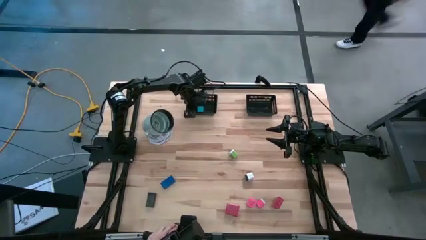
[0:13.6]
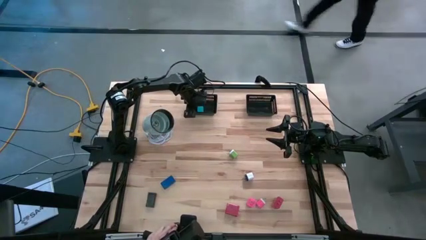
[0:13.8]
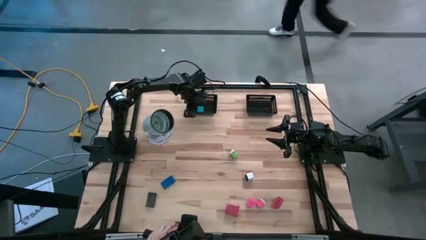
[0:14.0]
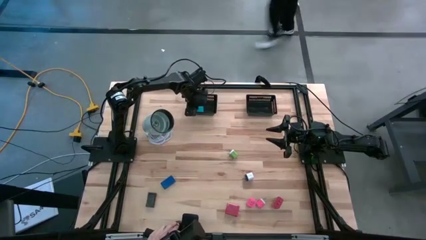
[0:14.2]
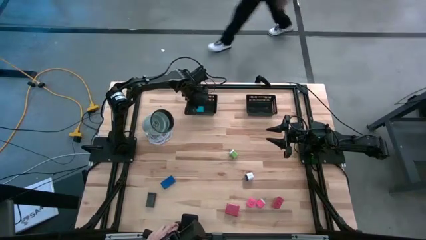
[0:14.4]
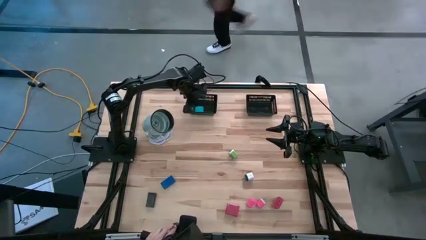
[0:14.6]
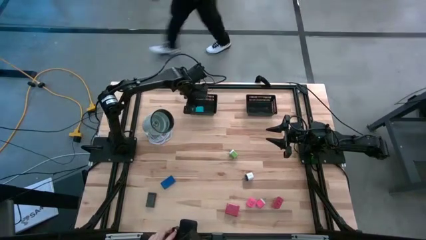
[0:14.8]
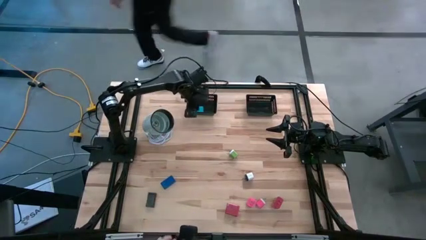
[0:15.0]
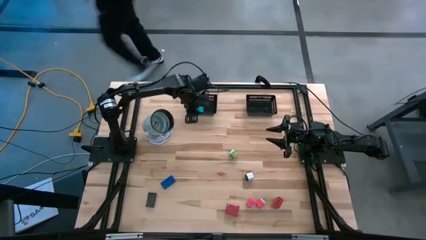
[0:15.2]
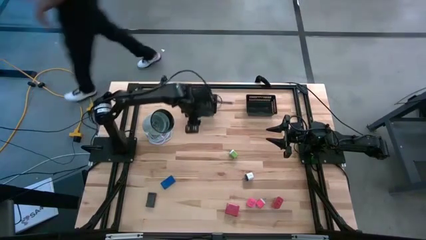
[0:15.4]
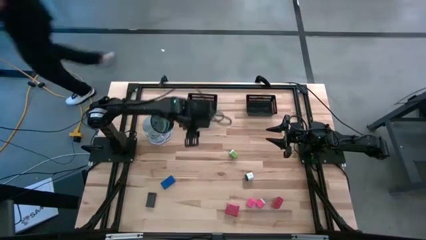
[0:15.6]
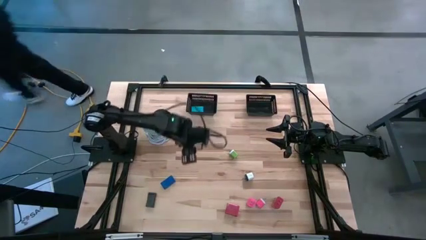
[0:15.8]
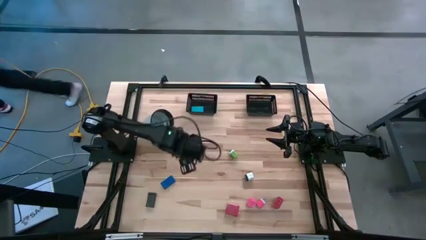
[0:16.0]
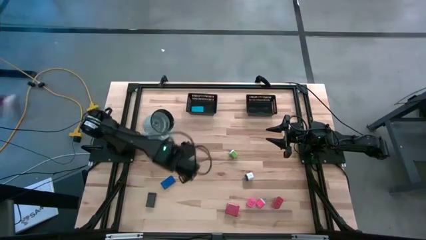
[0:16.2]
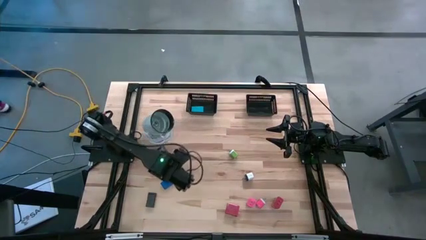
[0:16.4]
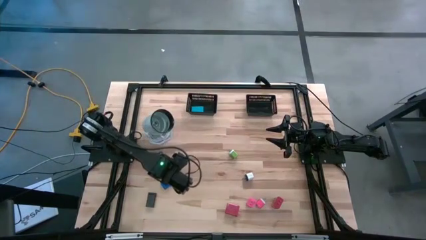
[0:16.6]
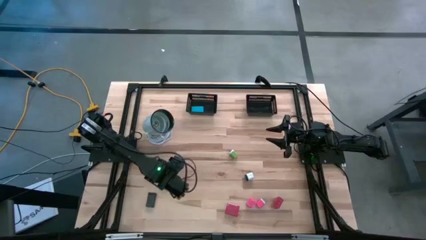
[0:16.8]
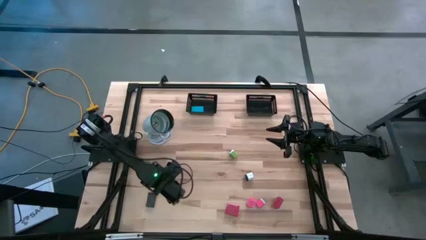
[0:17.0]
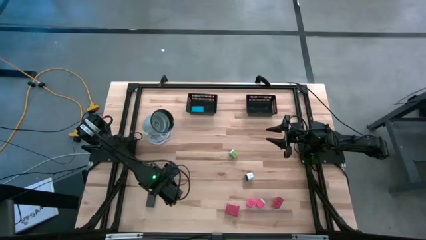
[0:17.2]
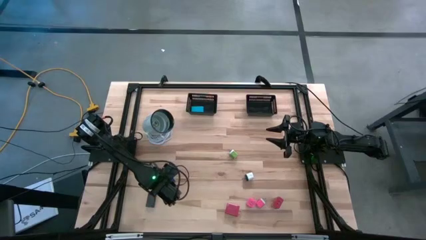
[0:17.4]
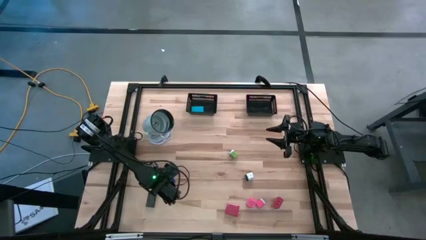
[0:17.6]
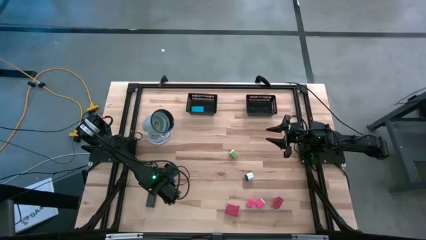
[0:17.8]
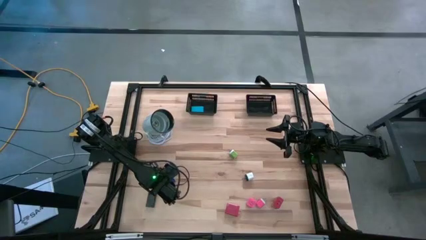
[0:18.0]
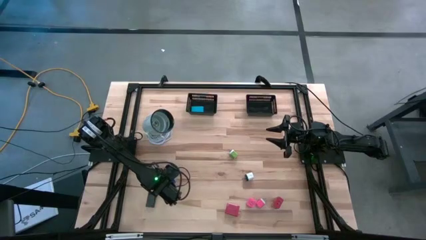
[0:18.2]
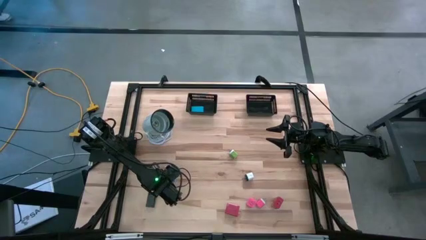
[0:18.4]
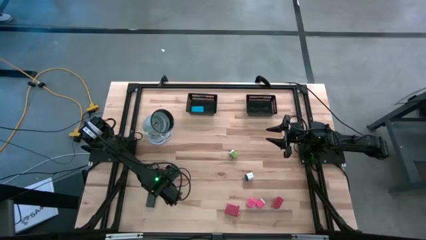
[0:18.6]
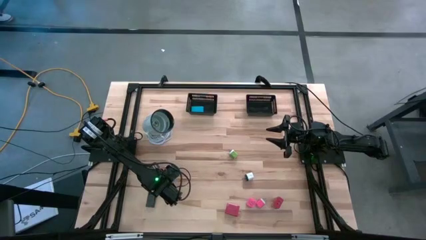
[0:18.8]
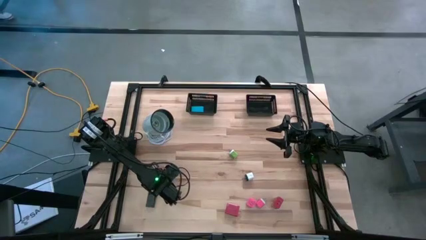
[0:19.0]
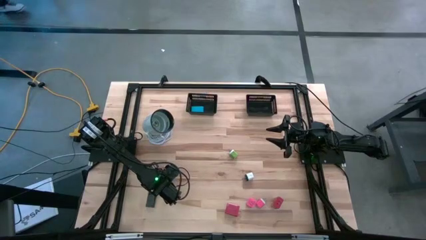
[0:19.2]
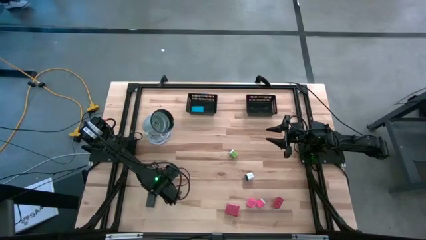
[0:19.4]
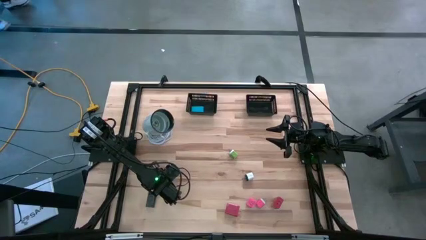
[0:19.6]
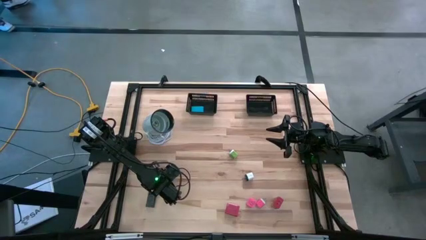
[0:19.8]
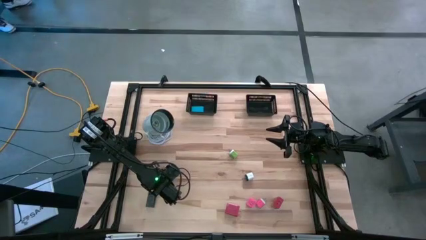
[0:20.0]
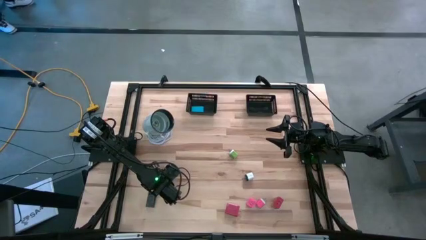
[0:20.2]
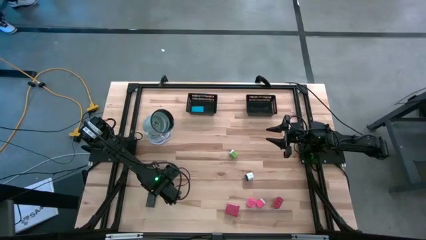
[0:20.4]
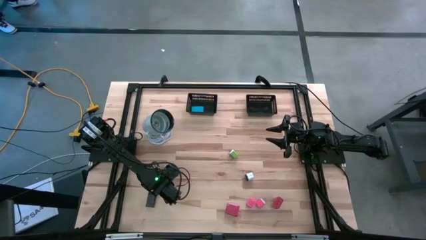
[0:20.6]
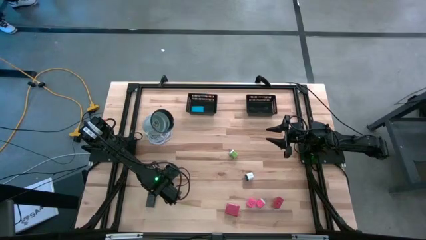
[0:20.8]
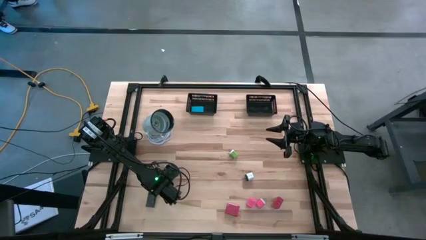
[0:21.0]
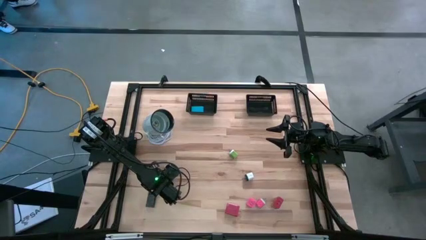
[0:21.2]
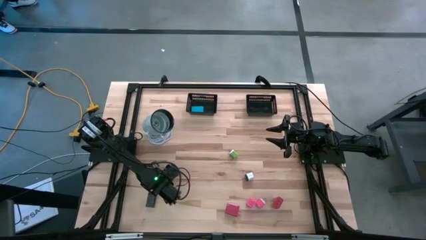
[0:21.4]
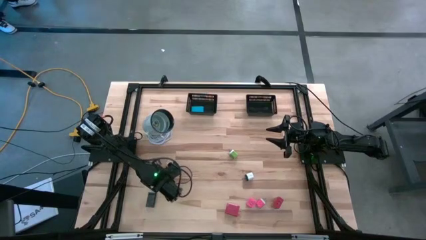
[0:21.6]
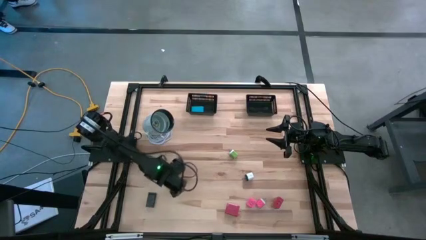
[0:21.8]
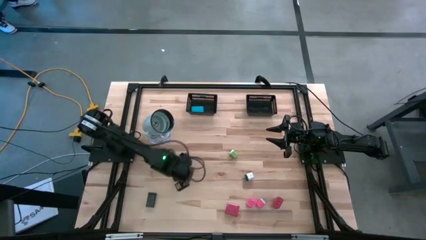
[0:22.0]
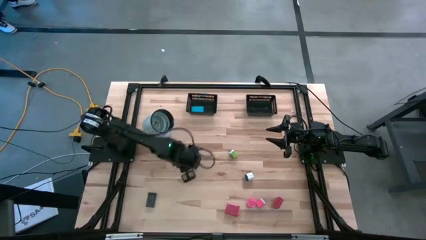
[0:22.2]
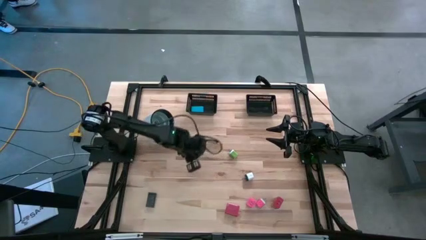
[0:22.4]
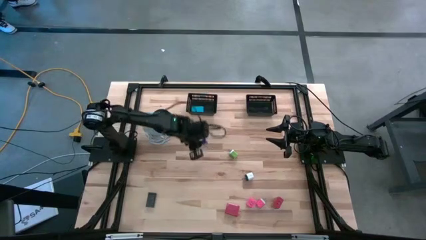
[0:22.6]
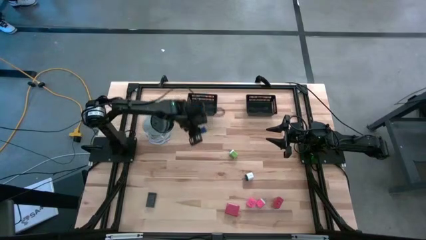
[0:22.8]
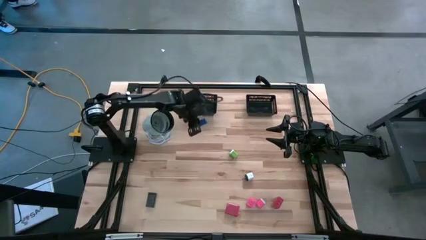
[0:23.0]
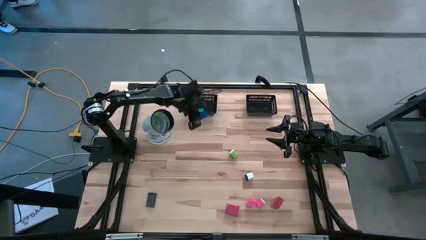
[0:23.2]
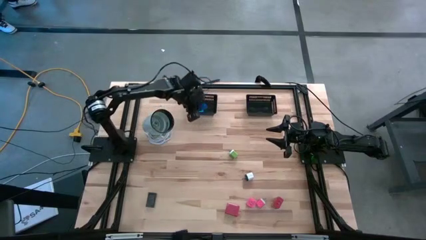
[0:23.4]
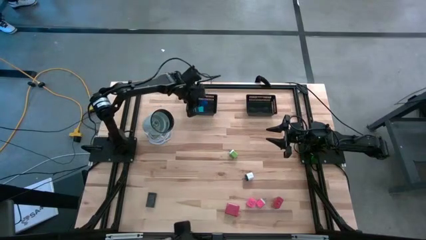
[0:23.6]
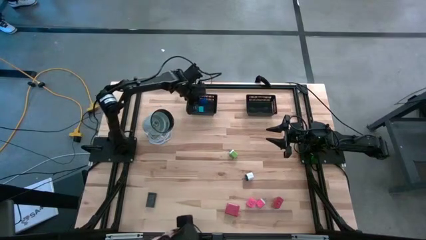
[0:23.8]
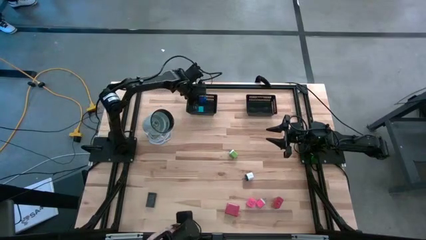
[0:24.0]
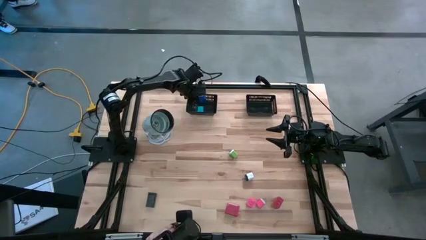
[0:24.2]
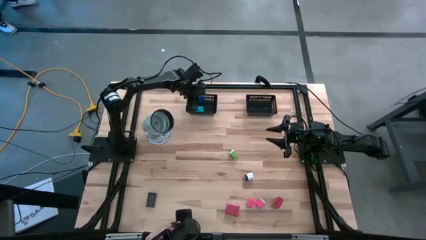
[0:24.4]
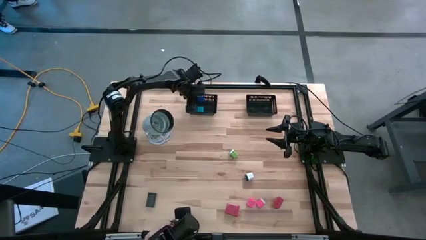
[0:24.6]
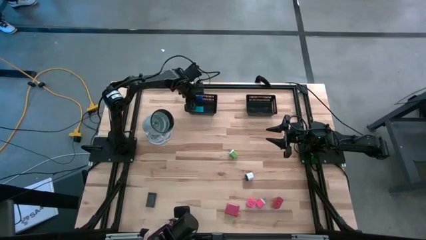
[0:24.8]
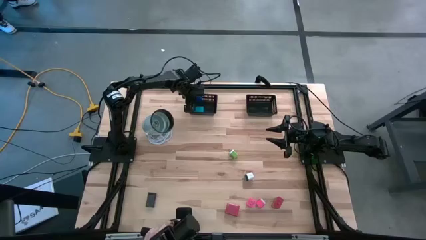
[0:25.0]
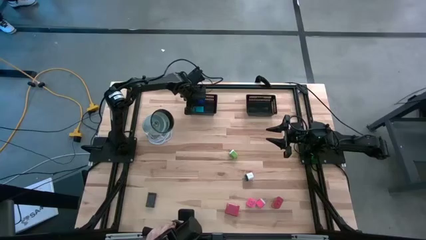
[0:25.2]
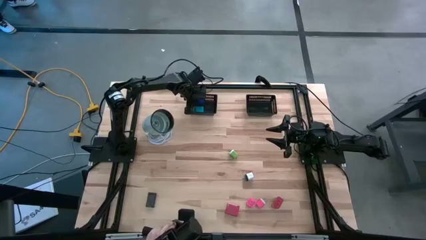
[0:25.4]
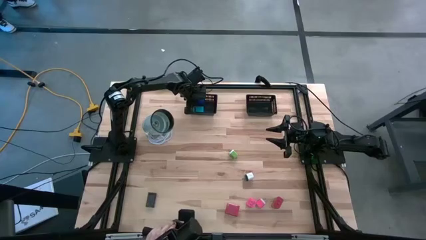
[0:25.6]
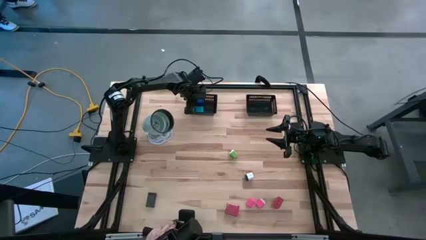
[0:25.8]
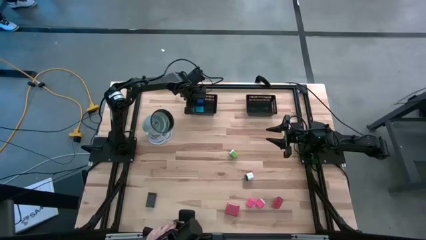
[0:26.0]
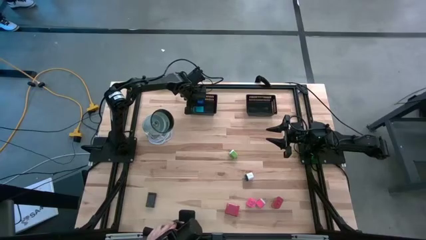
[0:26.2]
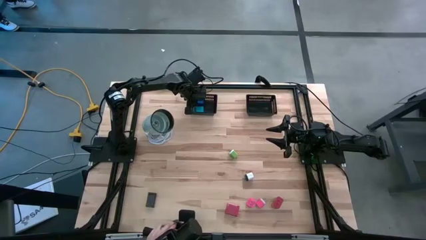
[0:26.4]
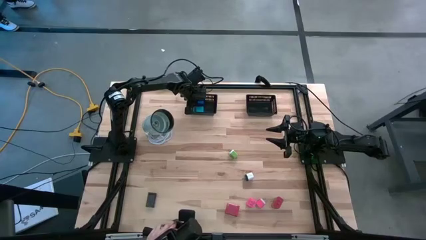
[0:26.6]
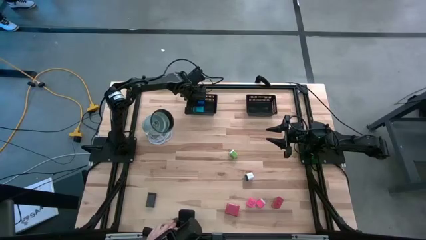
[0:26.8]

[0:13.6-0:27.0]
Task: Pick & Place Office items
Put the blue digital clock into the left black bin
